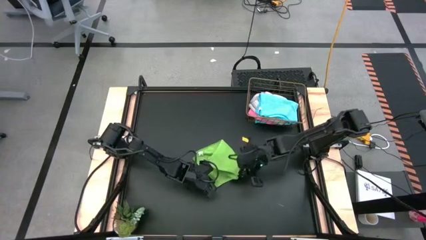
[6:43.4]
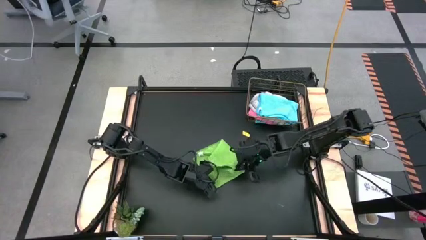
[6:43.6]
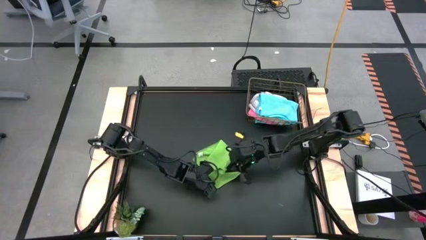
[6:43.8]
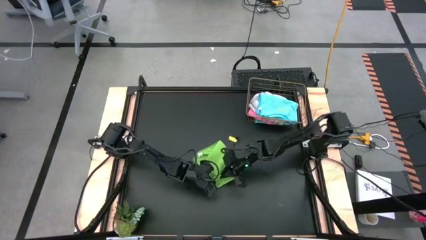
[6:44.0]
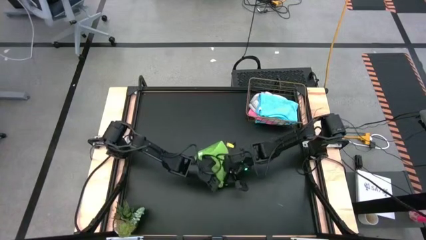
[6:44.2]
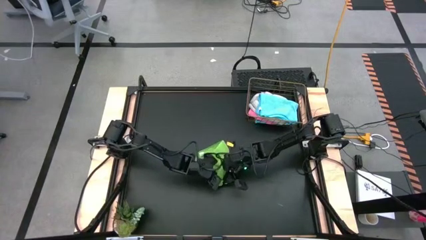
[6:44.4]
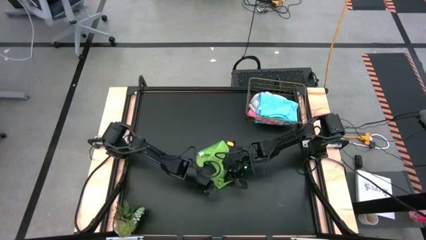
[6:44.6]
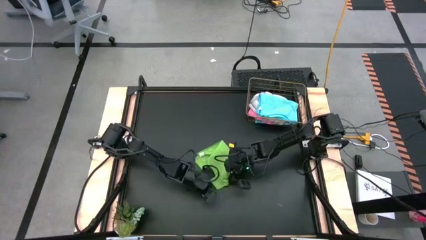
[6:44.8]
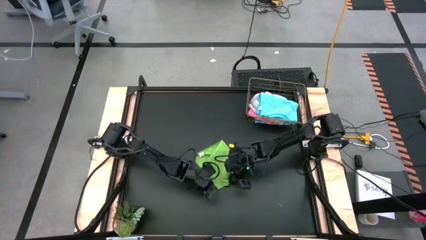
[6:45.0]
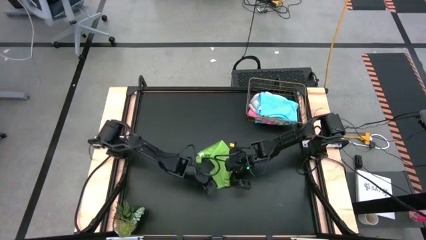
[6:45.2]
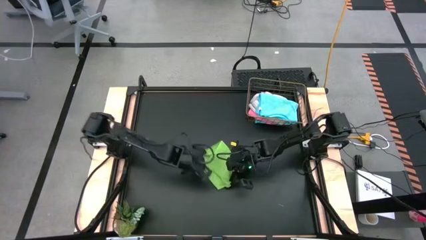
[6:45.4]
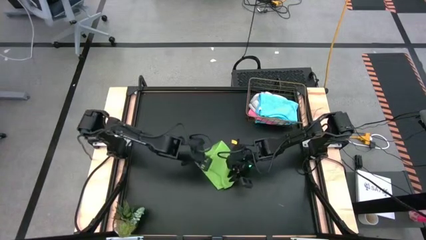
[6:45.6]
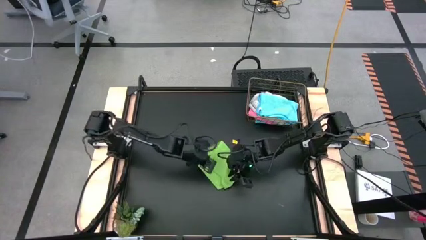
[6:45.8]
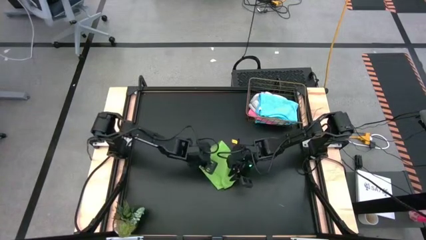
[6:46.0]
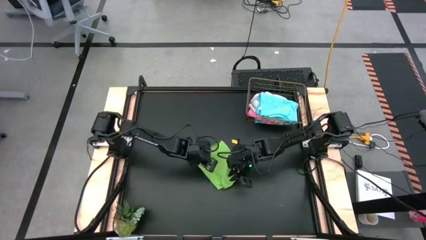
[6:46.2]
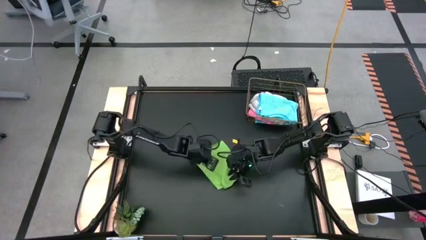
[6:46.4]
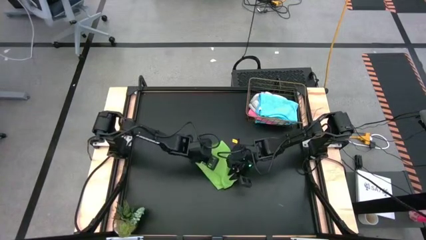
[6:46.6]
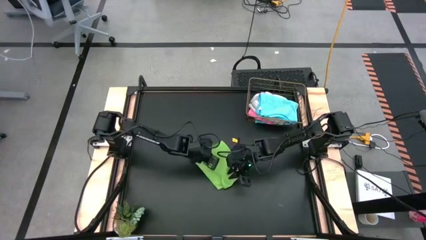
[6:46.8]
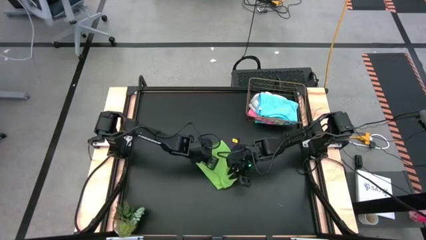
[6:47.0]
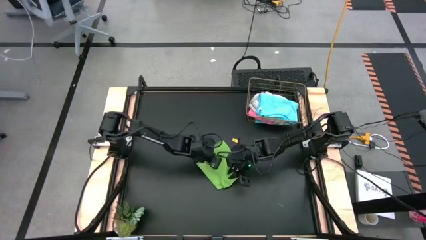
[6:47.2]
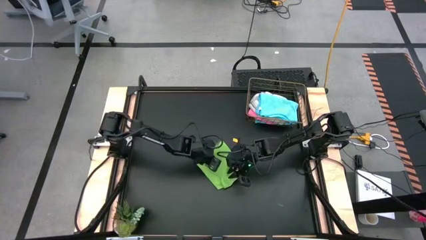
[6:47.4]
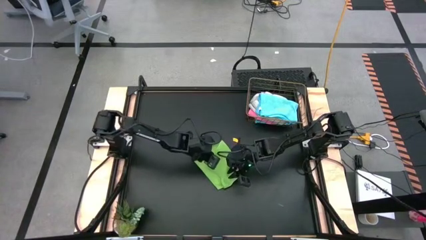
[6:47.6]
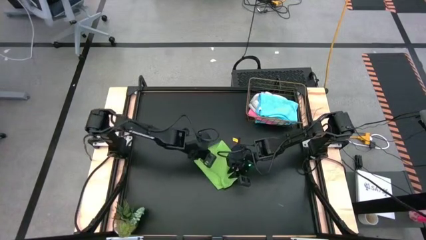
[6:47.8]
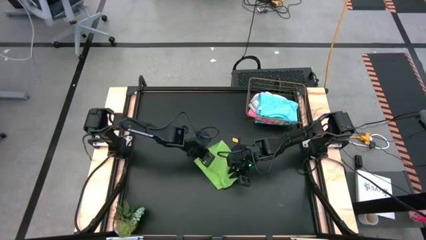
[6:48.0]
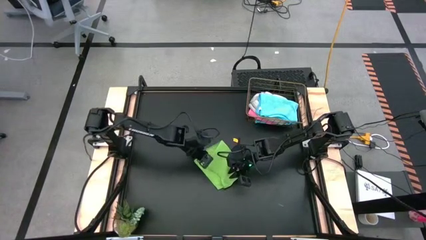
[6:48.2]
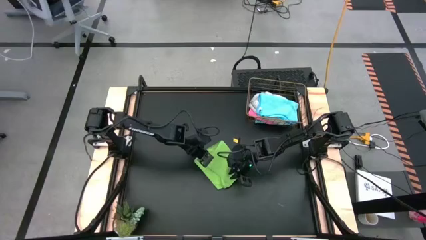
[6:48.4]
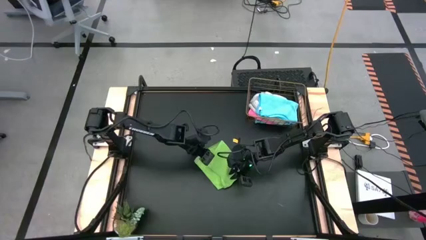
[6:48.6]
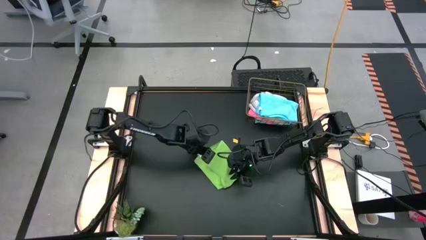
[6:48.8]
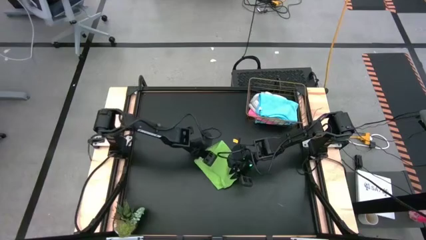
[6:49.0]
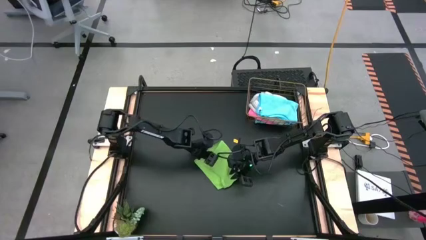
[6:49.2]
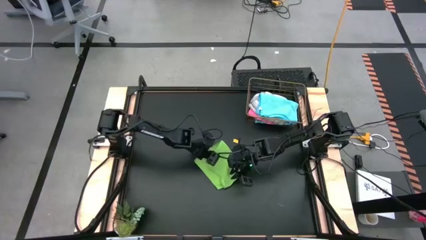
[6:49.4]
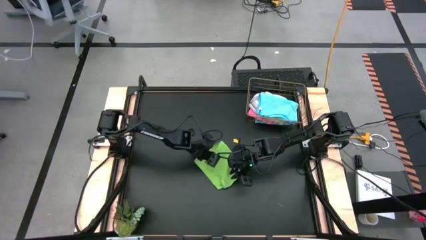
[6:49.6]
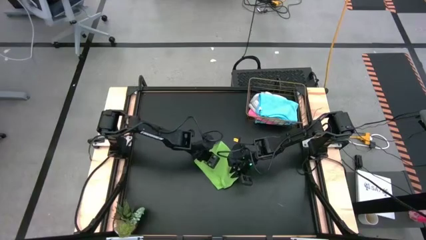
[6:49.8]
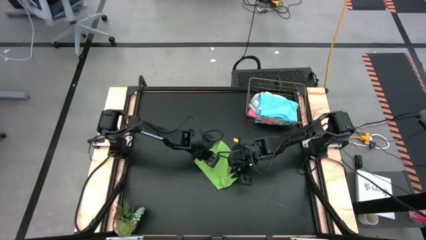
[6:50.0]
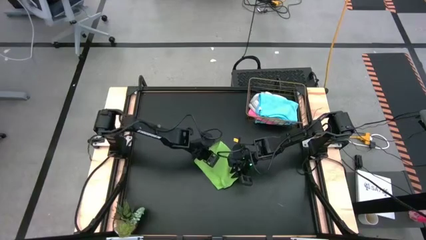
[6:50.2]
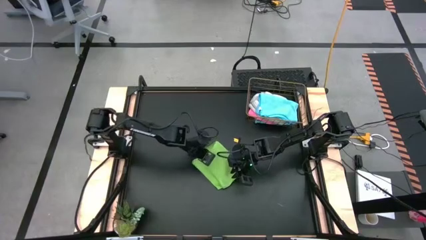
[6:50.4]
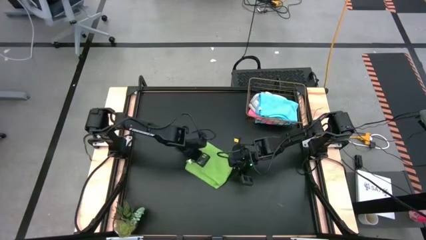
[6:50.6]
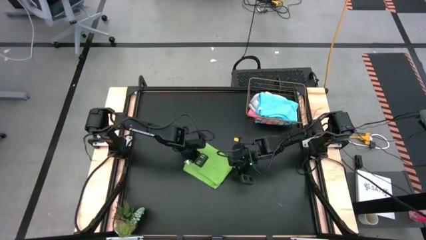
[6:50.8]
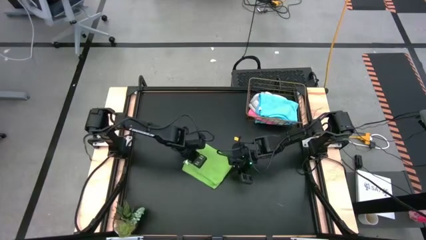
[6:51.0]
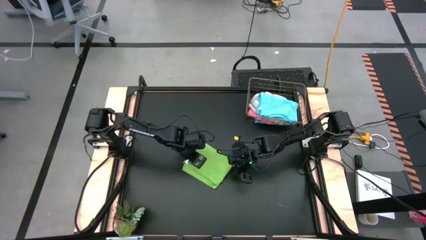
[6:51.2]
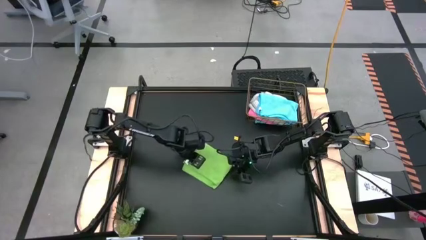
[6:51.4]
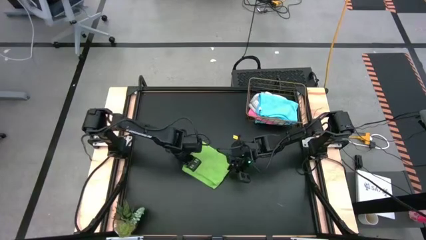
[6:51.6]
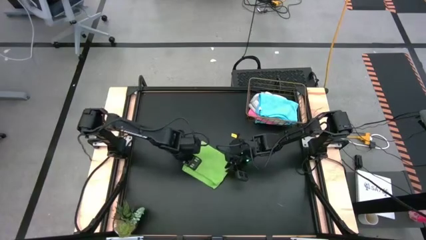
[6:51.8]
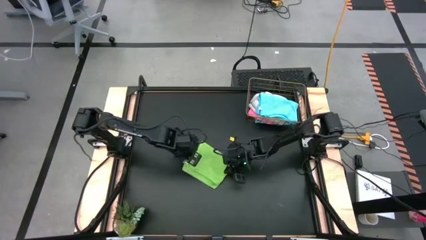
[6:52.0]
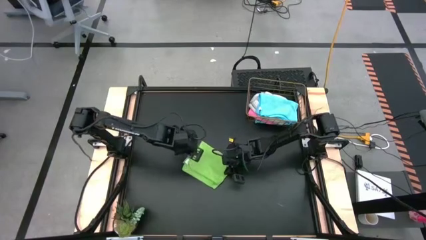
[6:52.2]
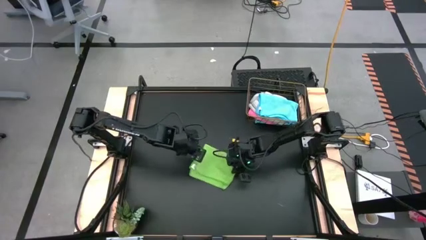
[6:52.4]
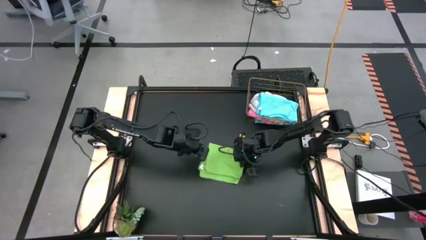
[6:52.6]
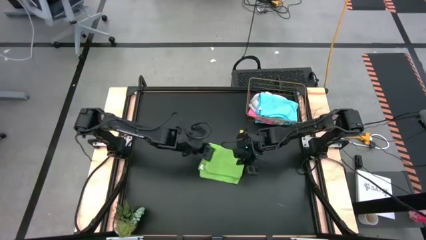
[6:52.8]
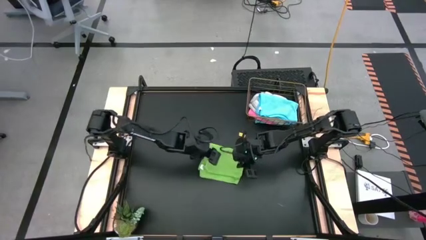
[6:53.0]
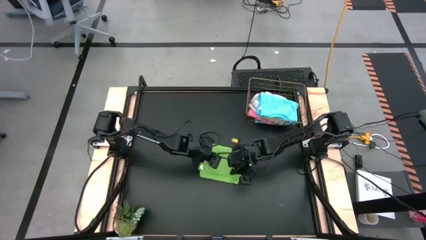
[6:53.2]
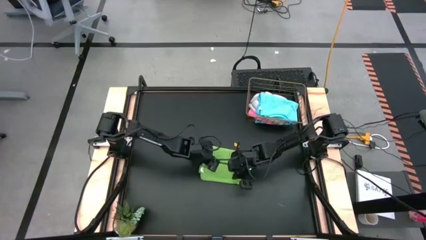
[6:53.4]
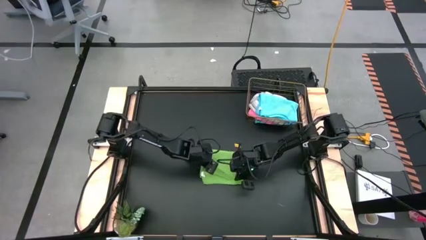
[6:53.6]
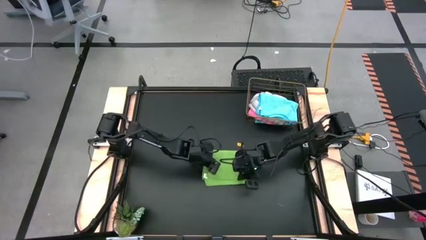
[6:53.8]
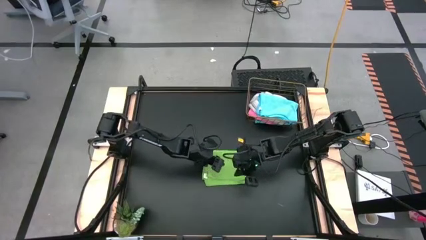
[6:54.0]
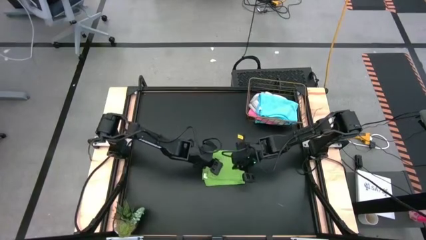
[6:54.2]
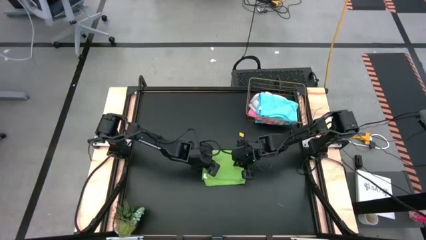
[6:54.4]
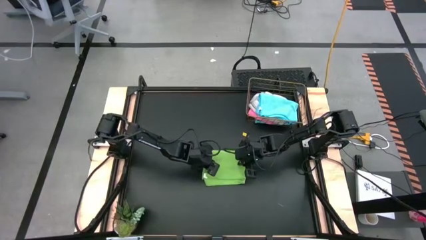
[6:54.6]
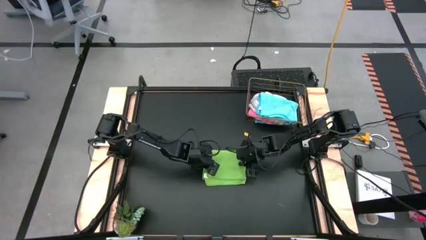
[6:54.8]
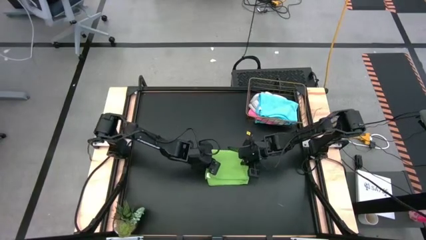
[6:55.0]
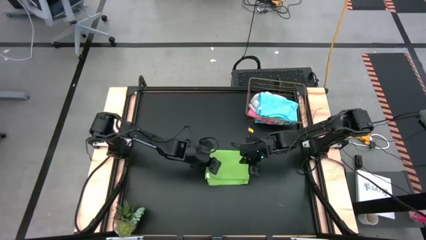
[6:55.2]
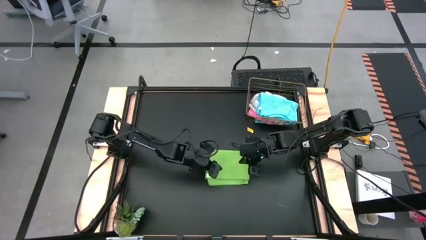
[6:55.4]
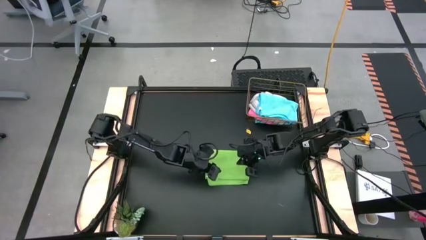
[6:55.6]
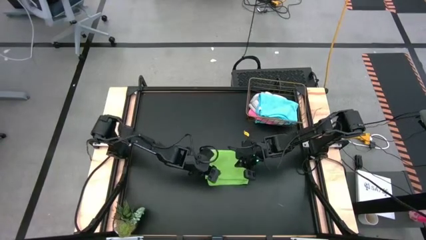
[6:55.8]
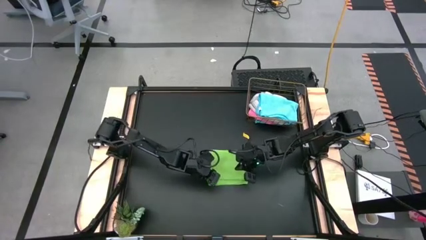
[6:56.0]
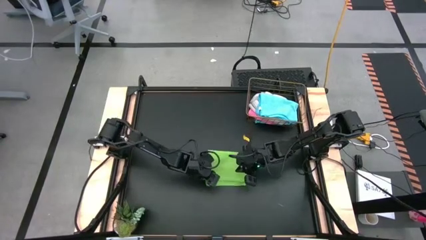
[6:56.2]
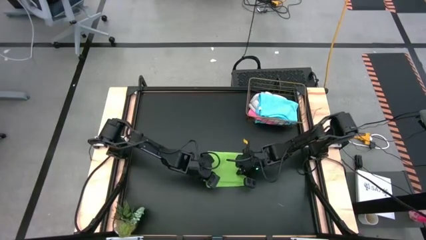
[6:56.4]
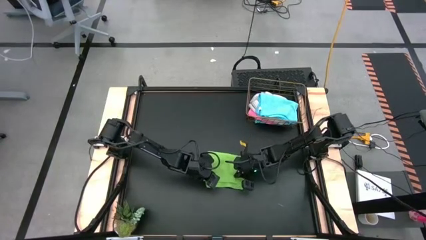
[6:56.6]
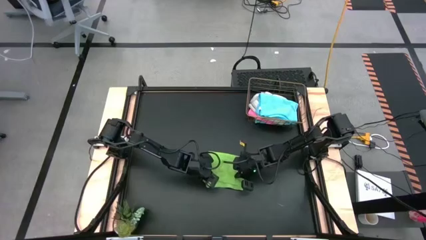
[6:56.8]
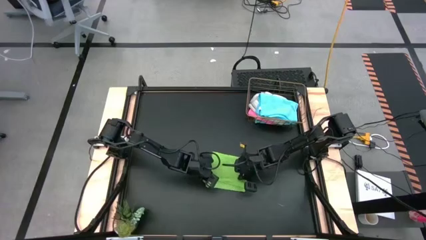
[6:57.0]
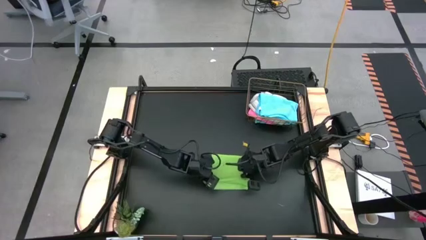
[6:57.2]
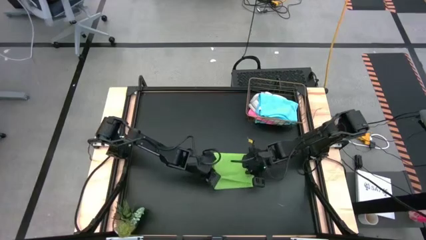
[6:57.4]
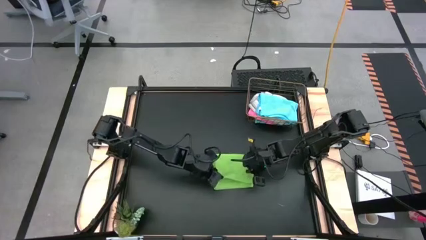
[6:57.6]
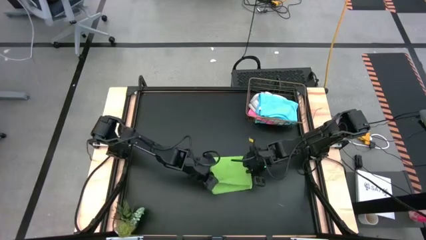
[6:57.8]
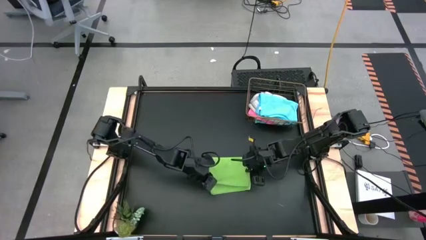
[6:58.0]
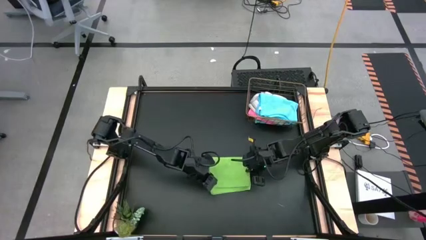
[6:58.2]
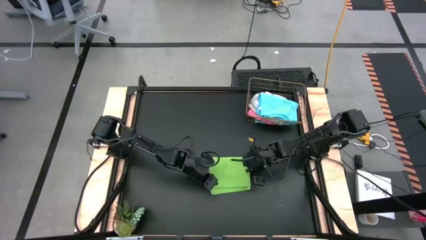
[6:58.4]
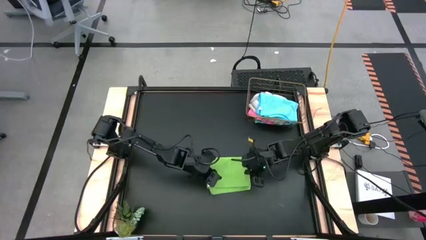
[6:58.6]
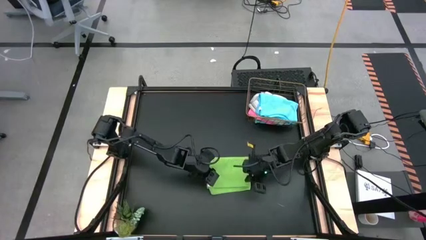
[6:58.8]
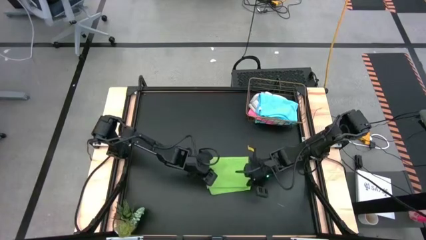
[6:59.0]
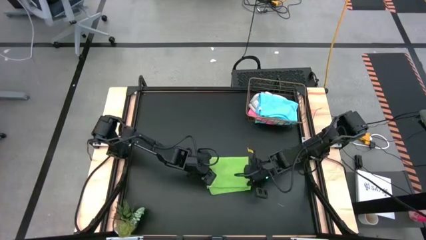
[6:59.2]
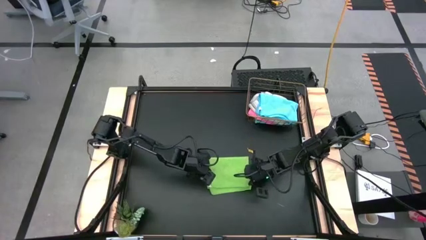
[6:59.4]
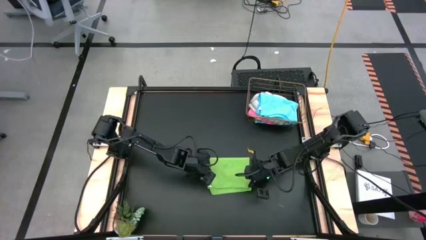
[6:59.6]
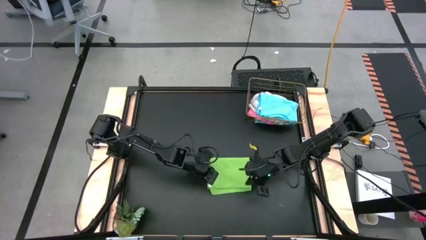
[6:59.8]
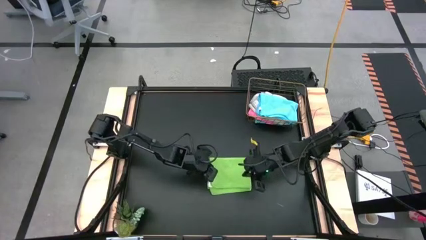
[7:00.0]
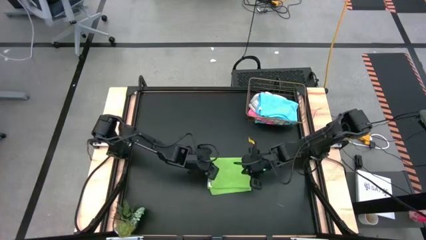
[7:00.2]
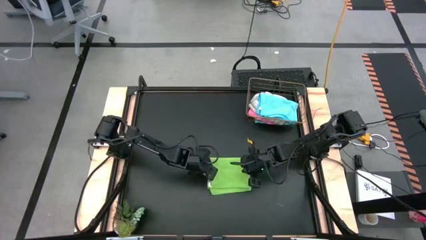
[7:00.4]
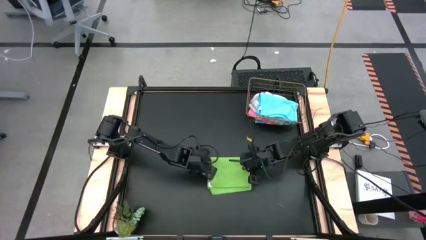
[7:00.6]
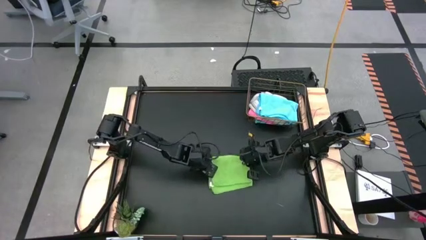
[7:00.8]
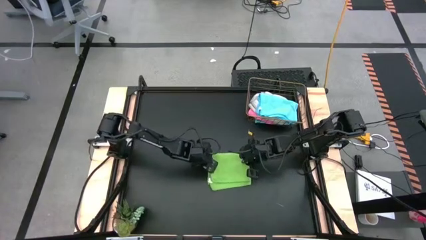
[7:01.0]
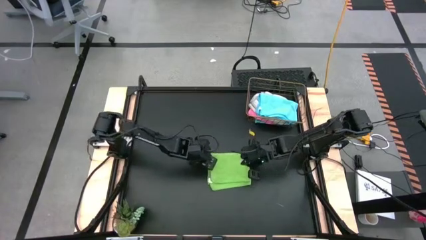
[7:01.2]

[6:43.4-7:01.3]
Task: Fold microfiber towels
Fold the green towel
